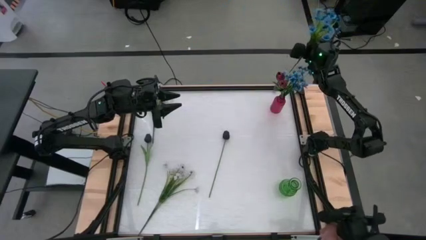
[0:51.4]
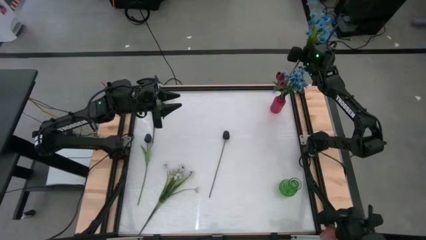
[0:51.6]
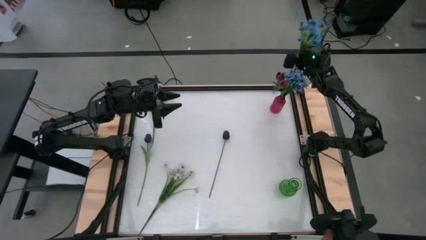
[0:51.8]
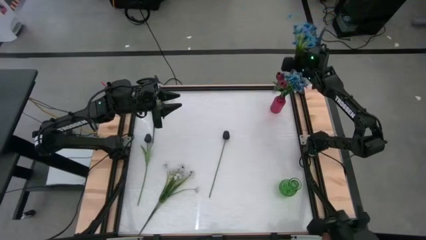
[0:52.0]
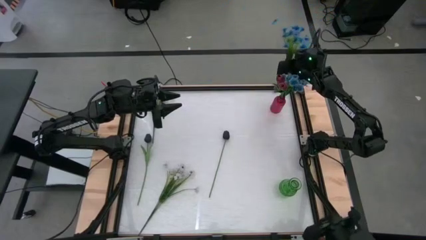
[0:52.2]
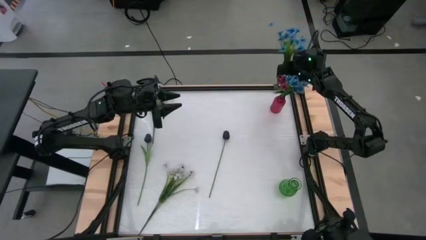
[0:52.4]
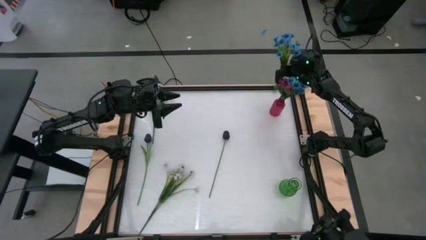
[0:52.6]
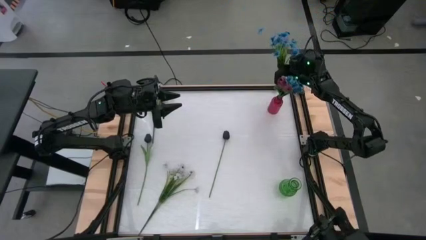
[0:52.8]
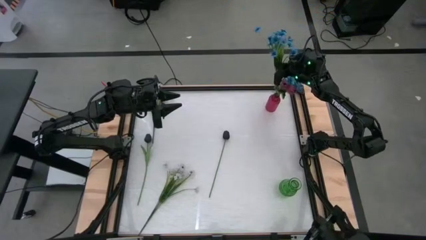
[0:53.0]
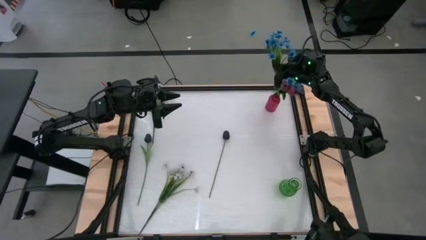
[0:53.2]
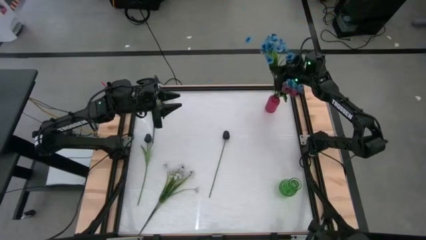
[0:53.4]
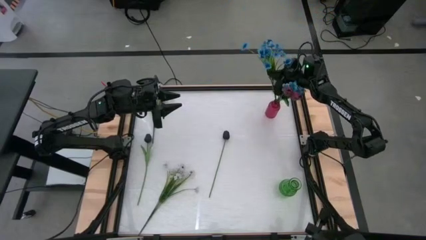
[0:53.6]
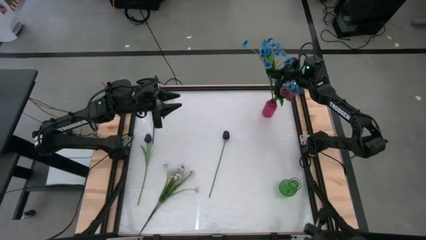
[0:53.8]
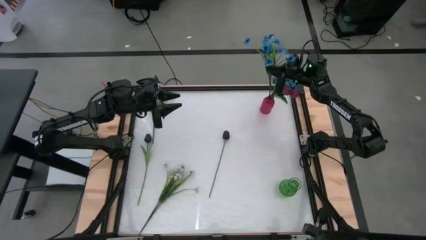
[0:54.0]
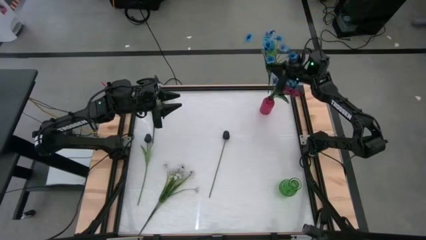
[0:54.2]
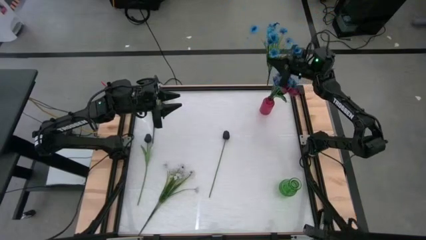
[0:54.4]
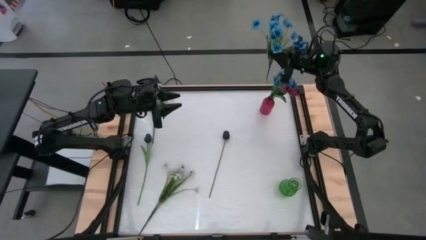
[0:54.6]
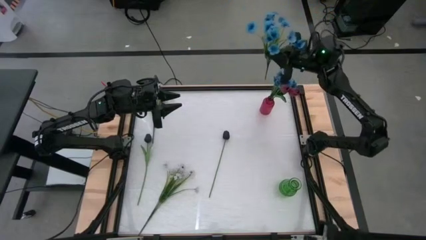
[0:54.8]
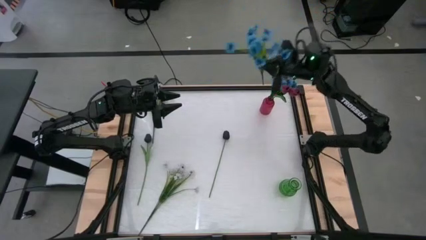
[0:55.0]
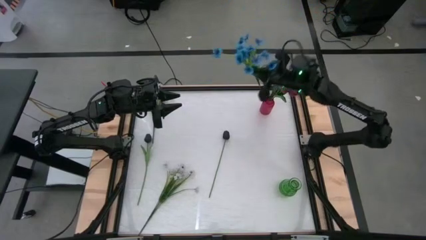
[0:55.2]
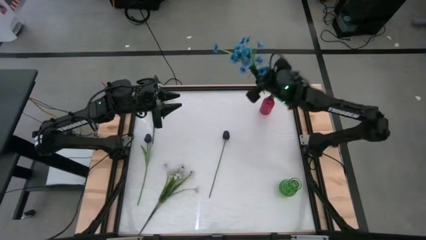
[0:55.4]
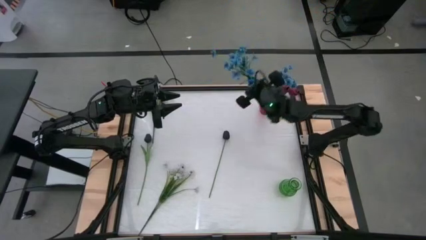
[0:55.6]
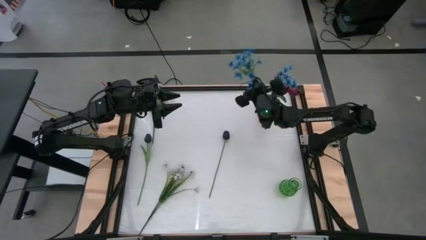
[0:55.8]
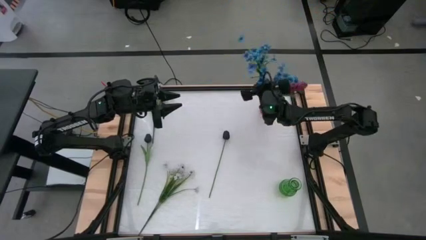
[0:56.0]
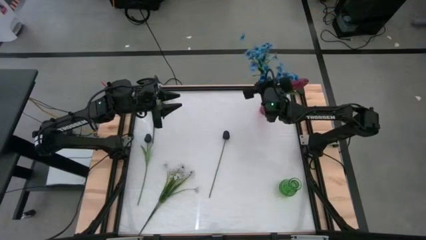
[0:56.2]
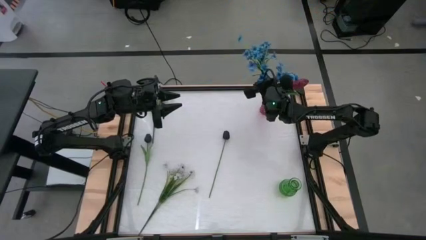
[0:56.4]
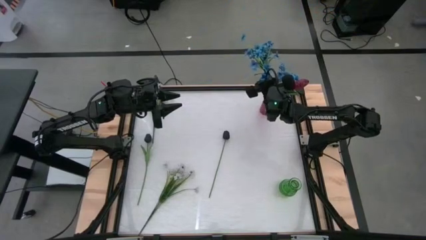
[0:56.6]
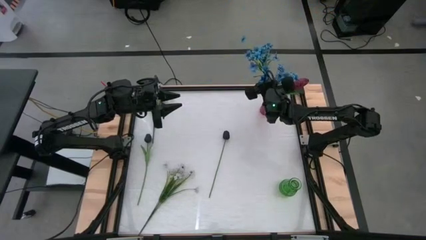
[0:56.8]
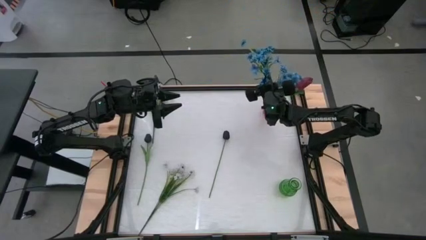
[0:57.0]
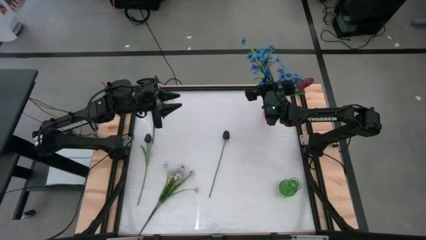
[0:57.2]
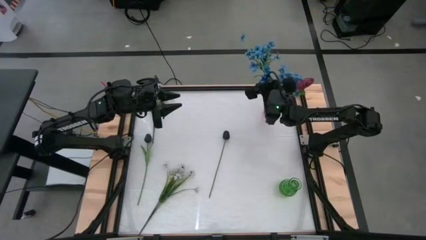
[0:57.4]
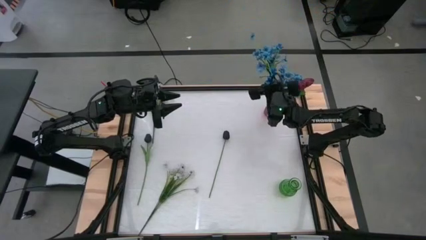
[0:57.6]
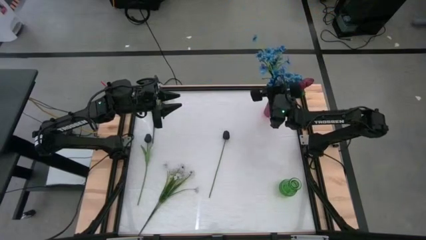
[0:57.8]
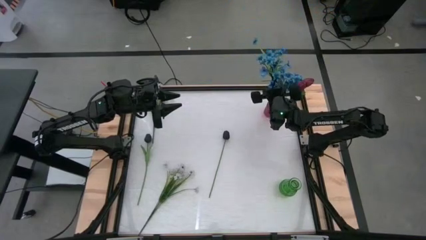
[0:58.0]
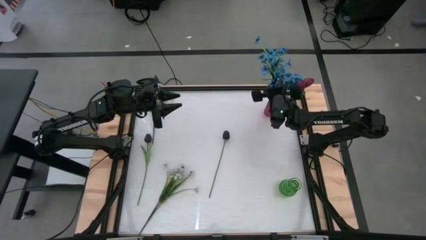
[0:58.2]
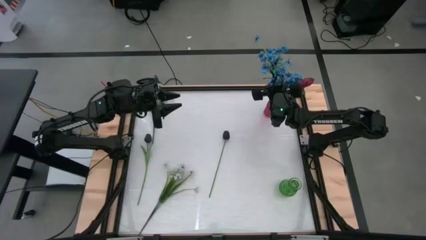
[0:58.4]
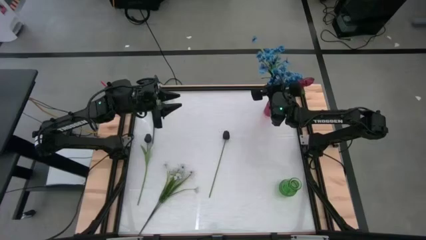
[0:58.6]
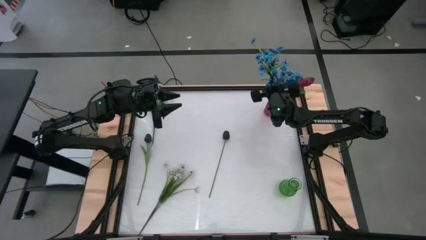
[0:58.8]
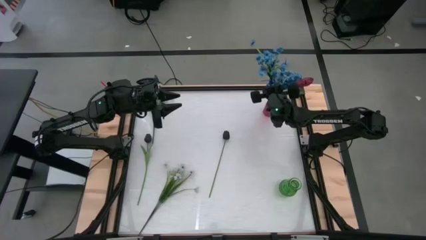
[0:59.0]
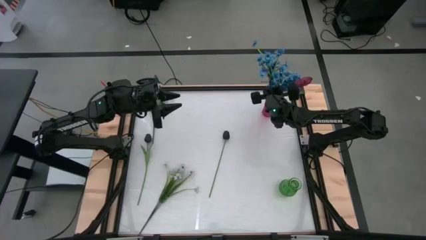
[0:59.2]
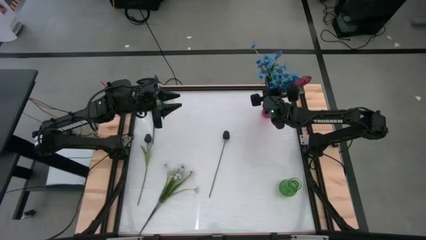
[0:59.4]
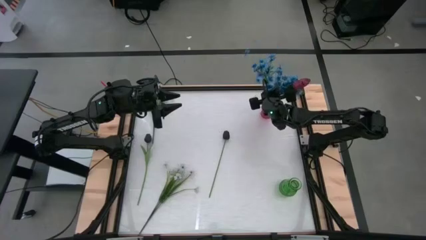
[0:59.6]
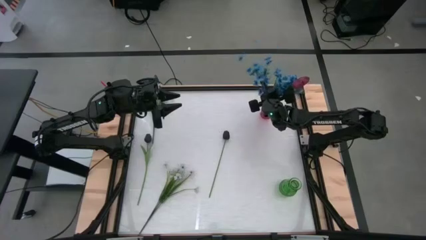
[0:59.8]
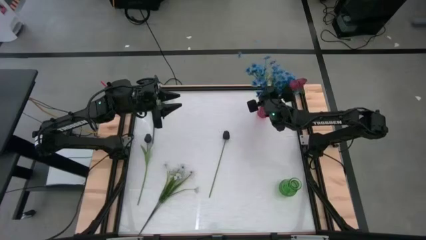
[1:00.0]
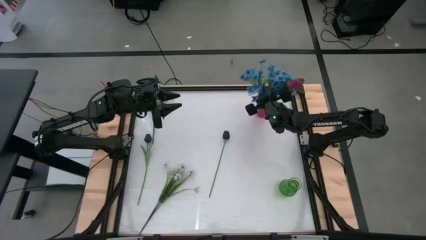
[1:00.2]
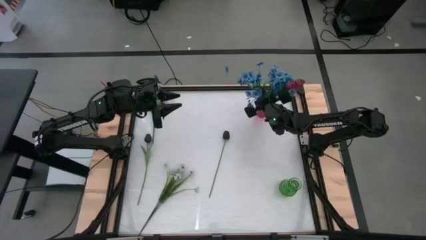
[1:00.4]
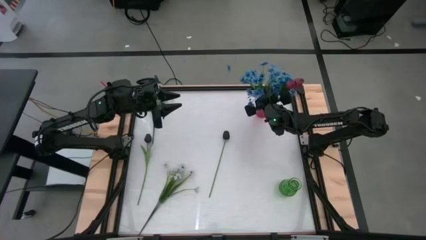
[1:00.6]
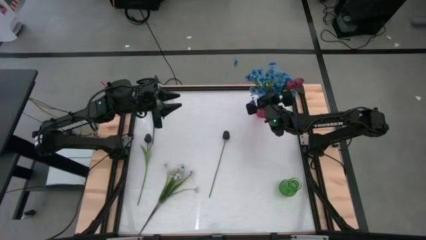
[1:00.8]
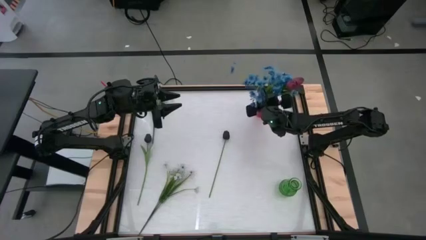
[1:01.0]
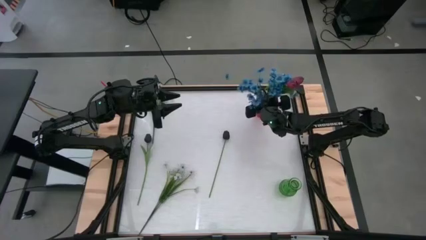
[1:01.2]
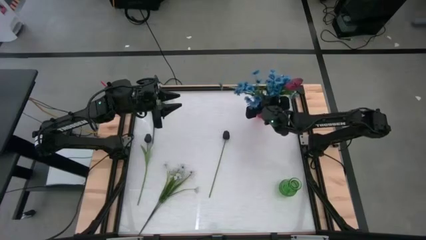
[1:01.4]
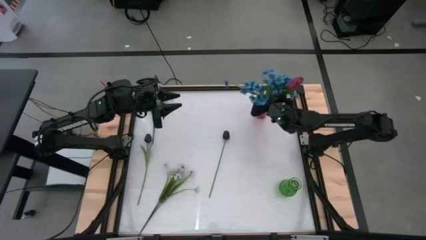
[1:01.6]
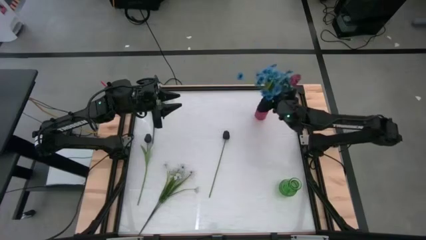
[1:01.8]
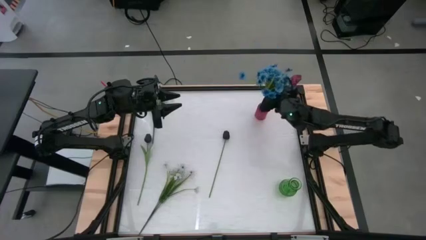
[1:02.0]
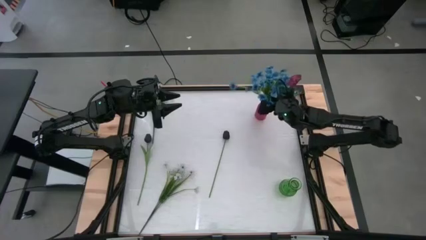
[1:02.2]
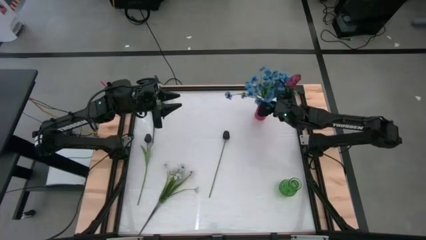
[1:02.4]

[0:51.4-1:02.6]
Task: Sort flowers into vase by color
Put the blue flowers into the red vase

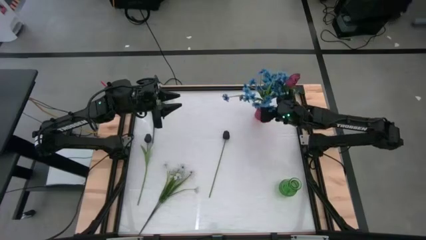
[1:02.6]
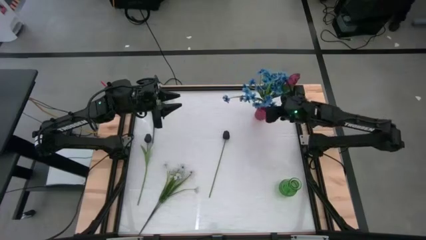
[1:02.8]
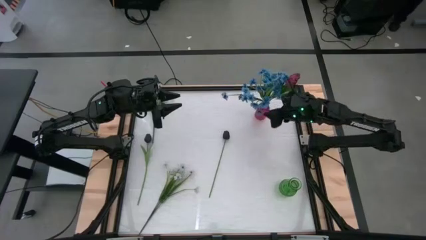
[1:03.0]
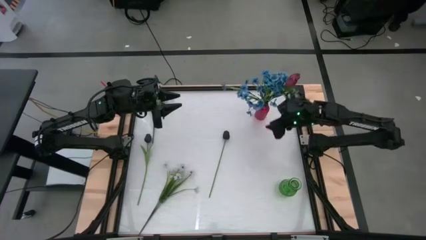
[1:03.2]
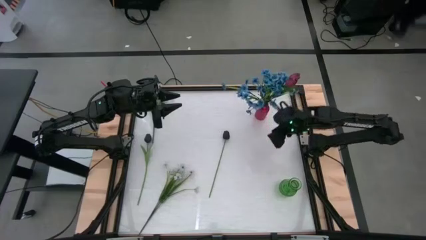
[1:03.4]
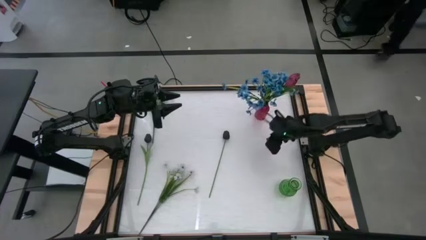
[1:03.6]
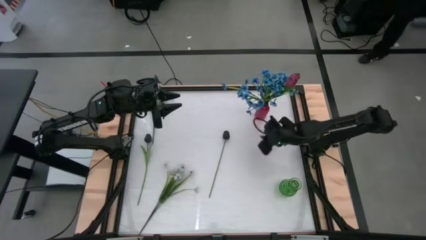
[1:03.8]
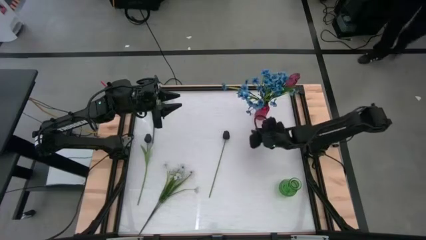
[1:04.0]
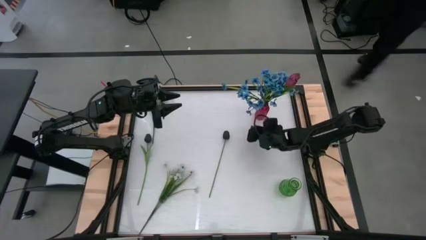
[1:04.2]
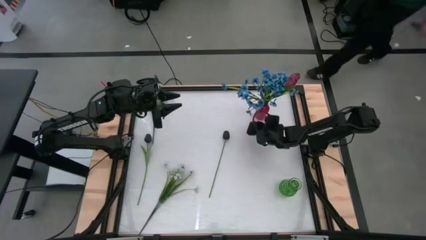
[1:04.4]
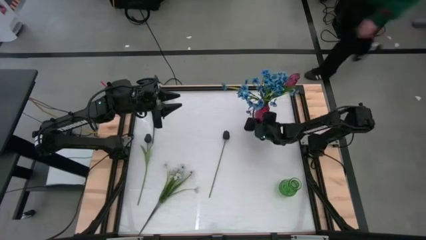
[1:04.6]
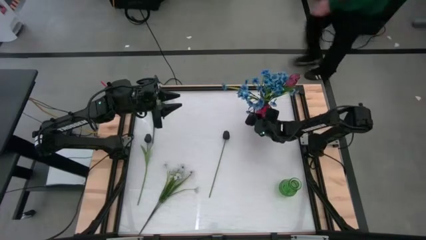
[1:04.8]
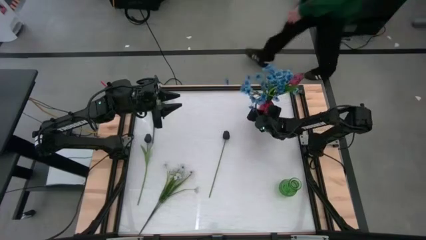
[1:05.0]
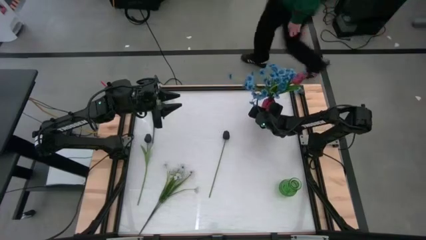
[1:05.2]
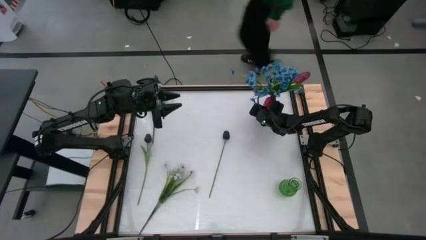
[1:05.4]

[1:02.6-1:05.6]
Adjust the red vase

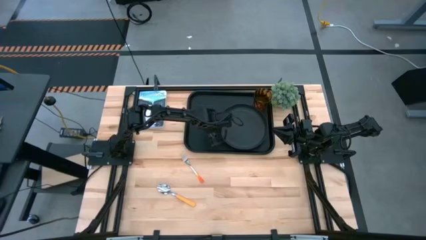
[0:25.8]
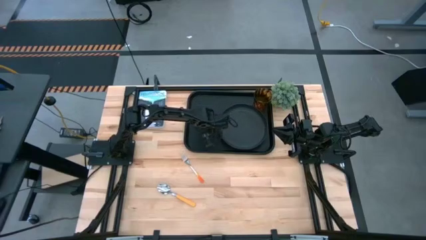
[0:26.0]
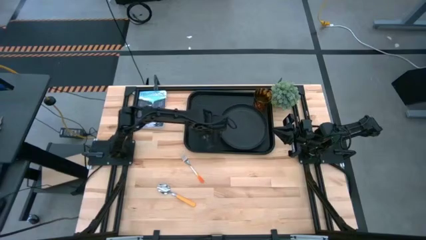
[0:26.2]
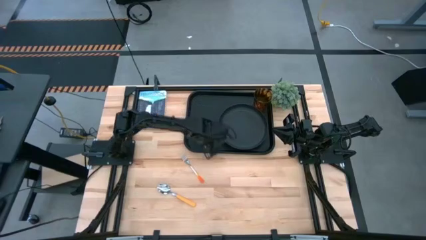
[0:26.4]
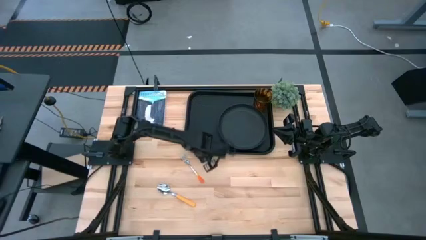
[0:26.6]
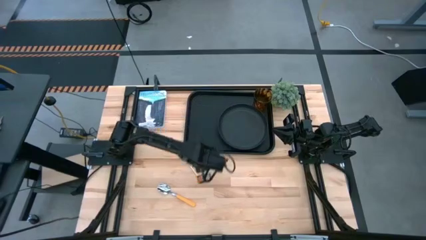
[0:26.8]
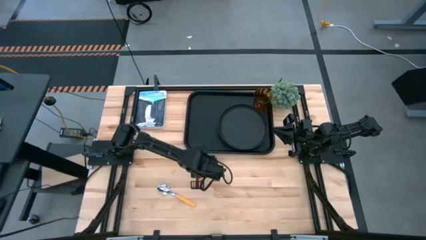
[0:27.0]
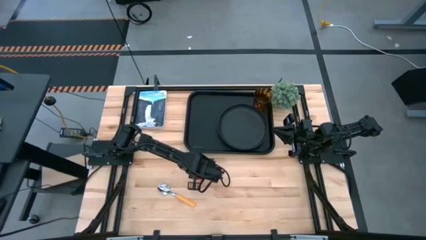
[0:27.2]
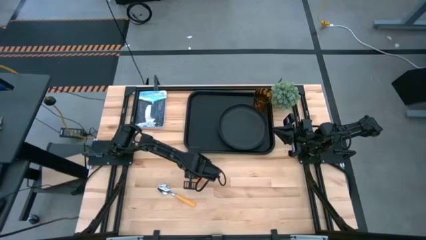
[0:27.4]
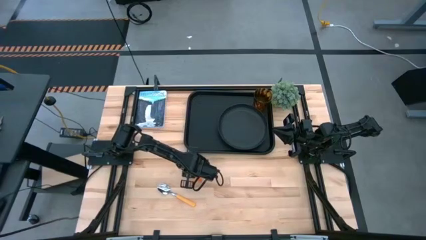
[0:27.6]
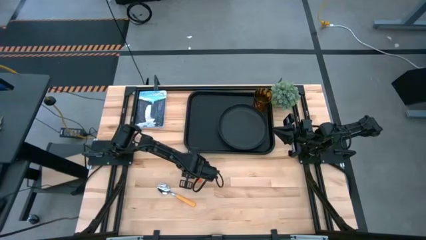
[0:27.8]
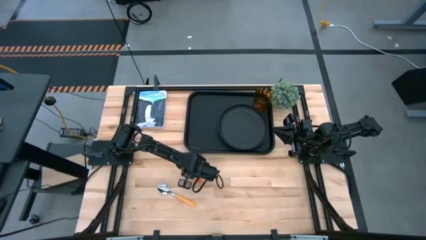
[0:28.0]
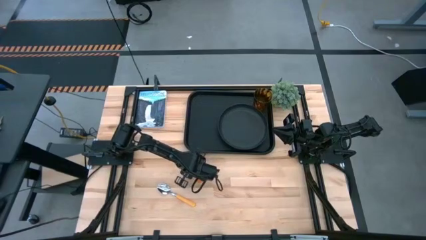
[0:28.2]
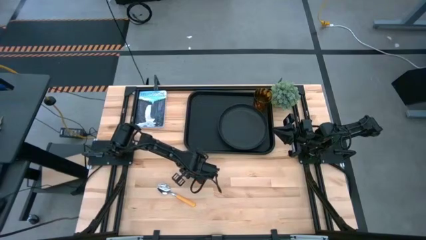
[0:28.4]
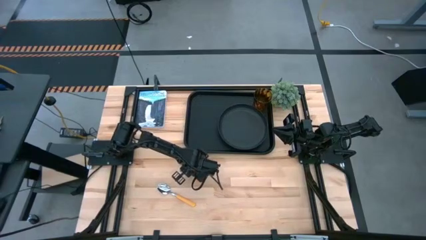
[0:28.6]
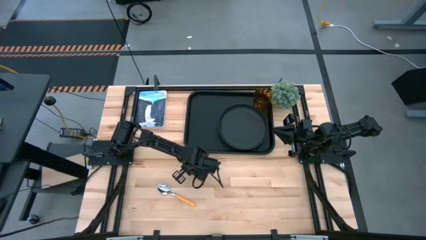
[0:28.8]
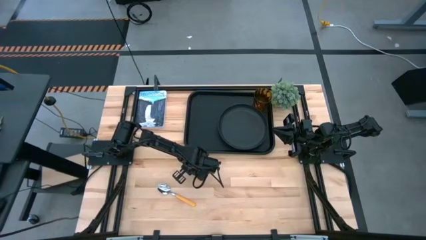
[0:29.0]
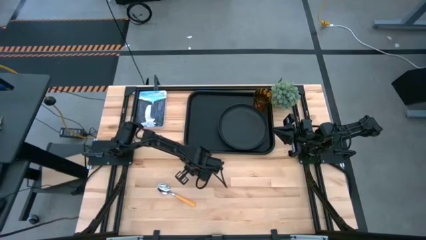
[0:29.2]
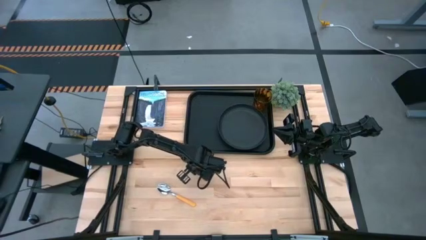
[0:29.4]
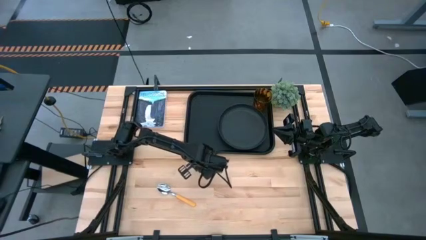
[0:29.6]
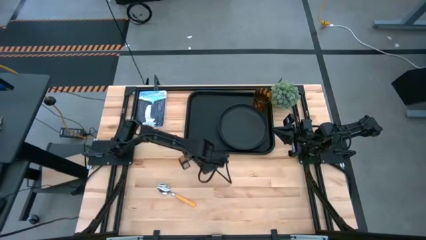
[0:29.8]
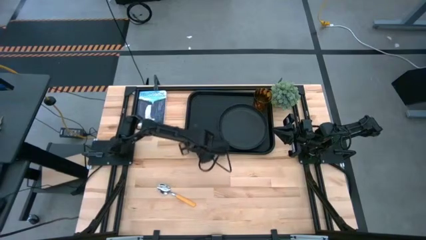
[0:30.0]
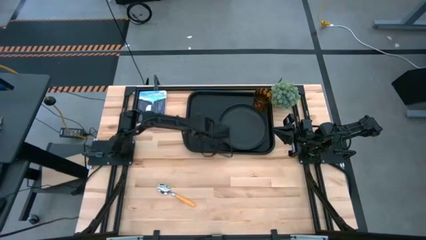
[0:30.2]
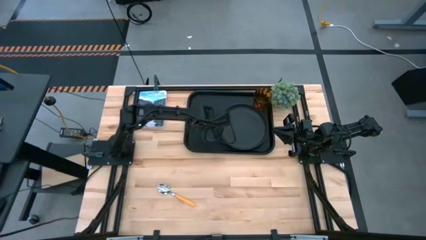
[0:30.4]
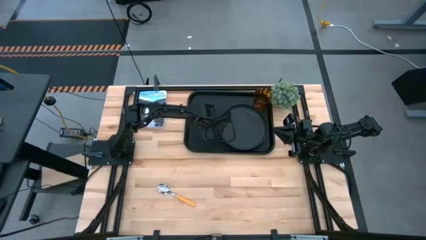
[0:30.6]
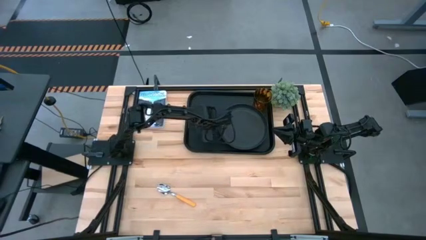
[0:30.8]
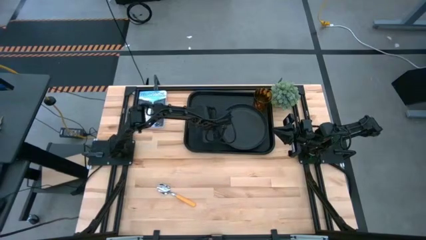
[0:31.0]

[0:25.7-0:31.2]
Task: Pick and place plate/cup/fork/spoon on tray
Put the orange fork on the black tray to the left of the black plate
